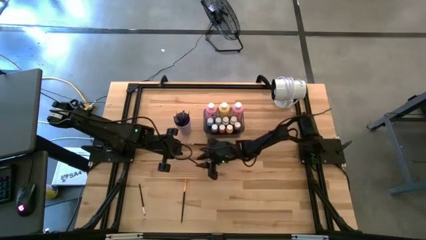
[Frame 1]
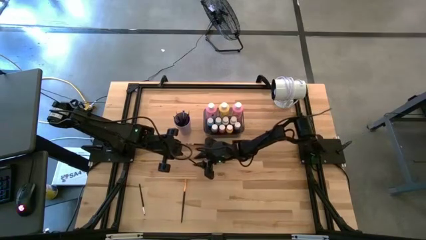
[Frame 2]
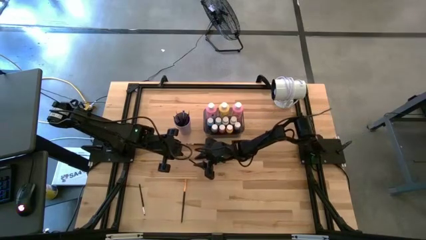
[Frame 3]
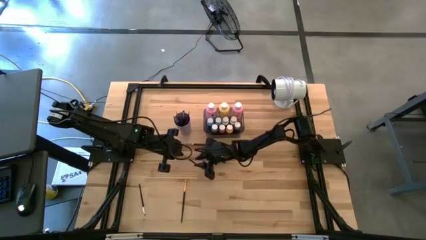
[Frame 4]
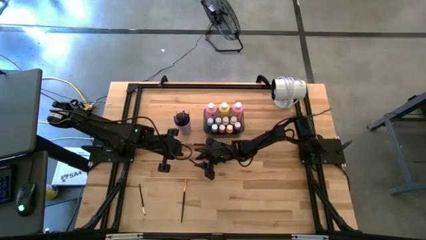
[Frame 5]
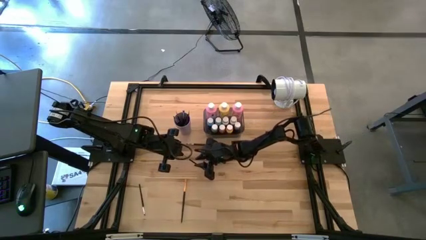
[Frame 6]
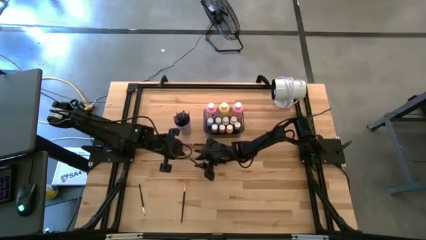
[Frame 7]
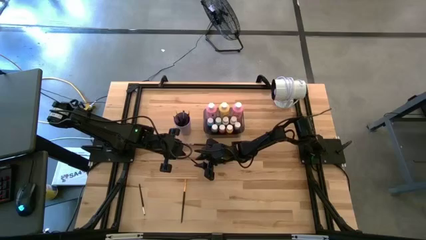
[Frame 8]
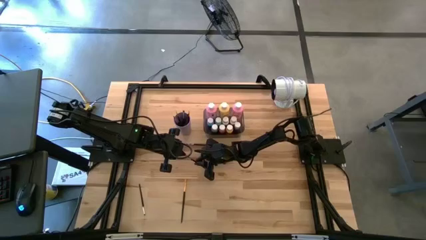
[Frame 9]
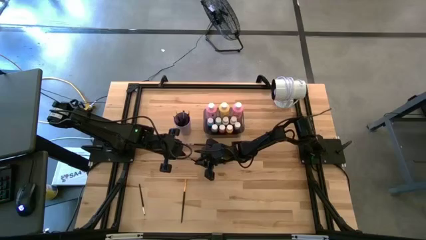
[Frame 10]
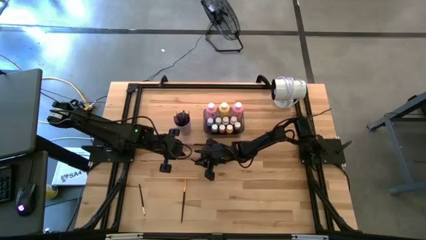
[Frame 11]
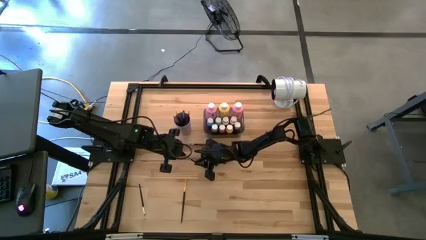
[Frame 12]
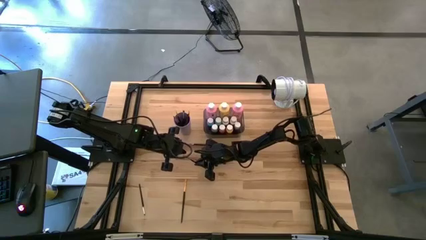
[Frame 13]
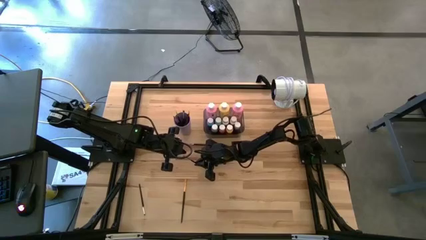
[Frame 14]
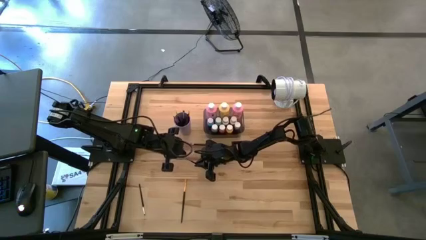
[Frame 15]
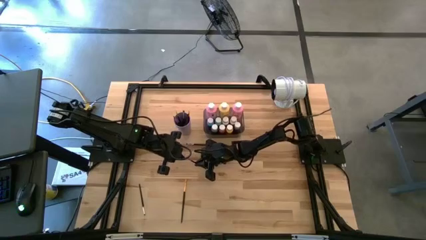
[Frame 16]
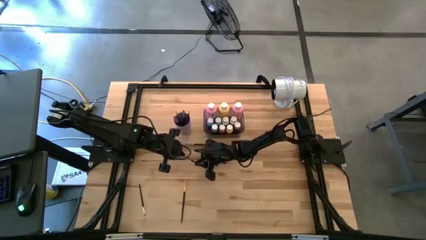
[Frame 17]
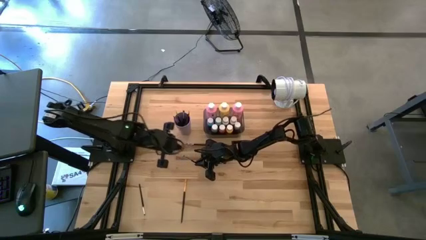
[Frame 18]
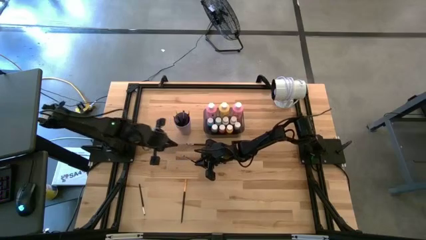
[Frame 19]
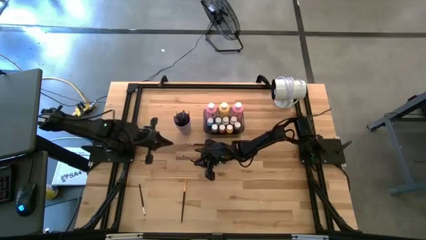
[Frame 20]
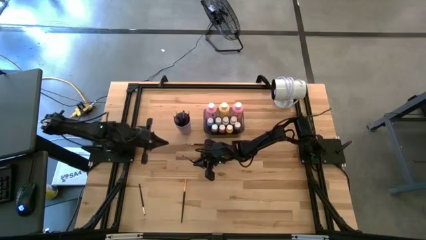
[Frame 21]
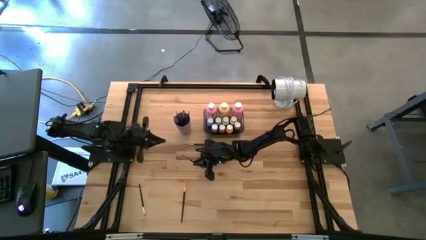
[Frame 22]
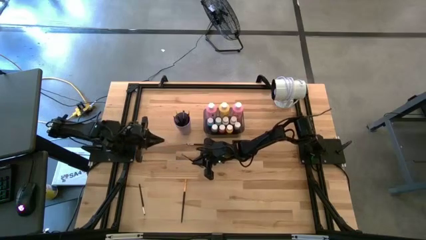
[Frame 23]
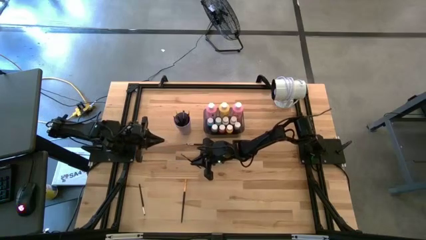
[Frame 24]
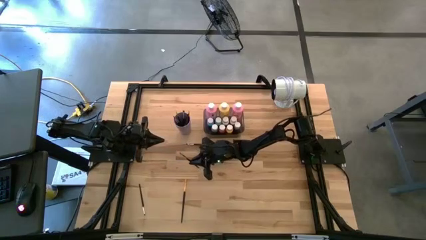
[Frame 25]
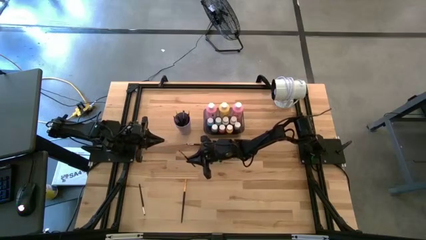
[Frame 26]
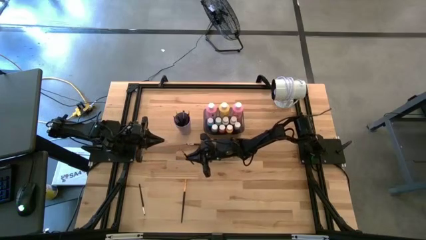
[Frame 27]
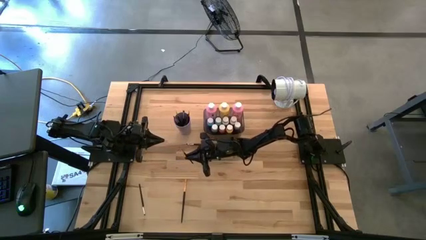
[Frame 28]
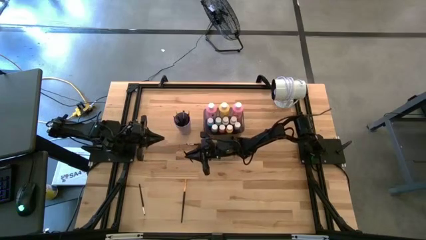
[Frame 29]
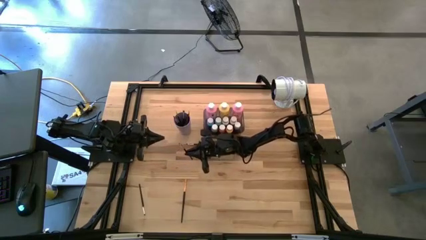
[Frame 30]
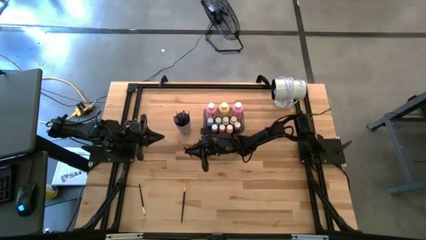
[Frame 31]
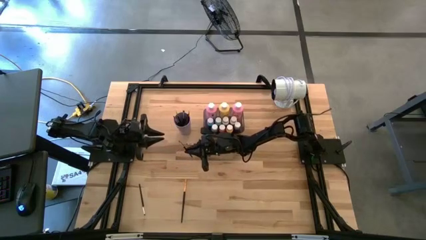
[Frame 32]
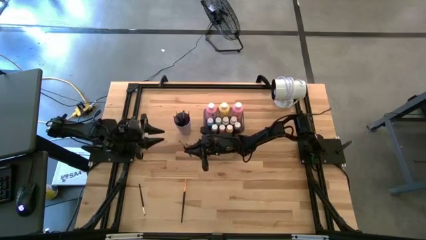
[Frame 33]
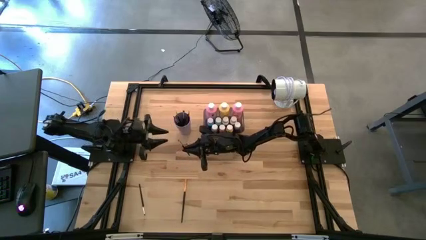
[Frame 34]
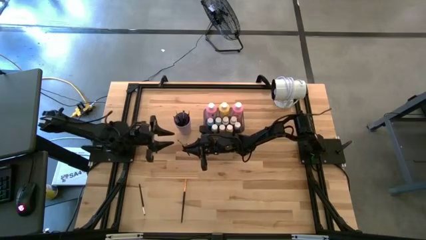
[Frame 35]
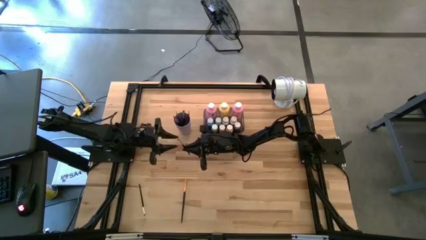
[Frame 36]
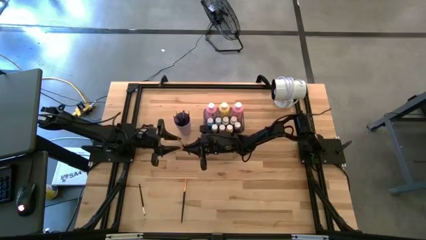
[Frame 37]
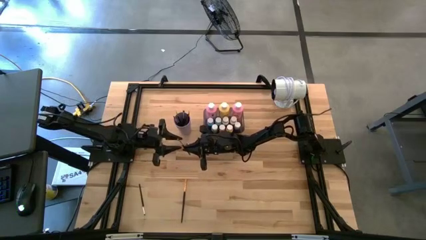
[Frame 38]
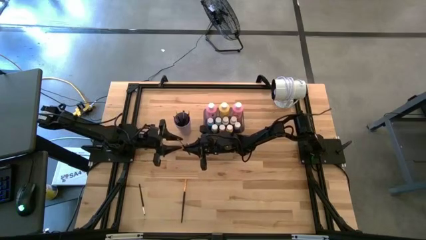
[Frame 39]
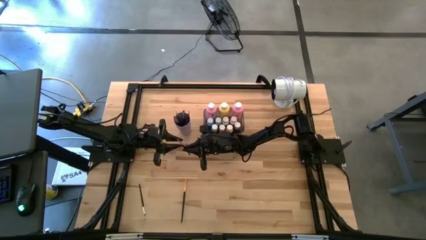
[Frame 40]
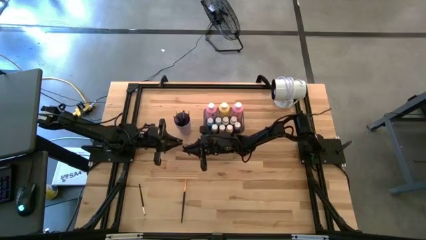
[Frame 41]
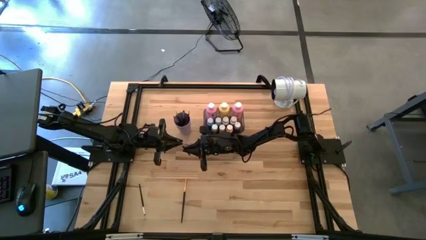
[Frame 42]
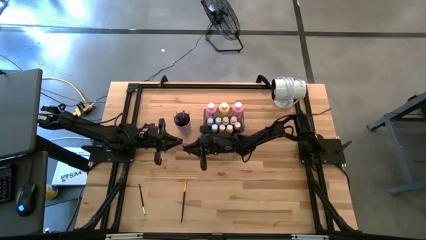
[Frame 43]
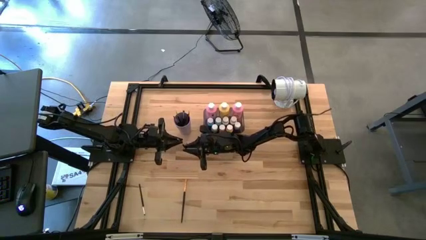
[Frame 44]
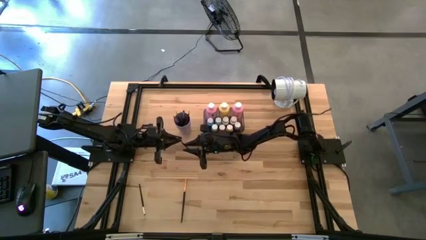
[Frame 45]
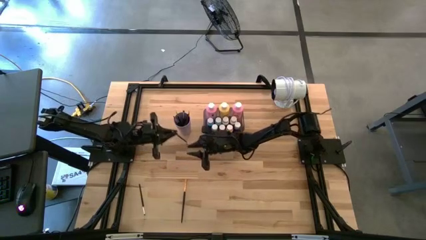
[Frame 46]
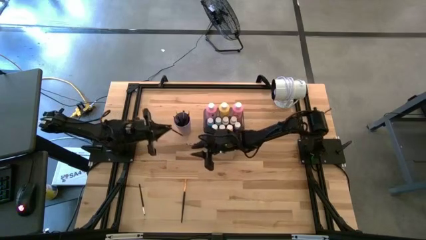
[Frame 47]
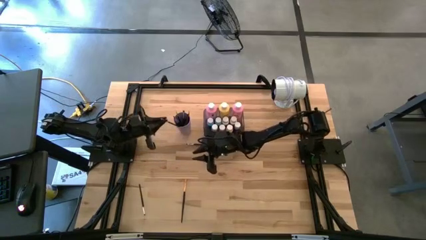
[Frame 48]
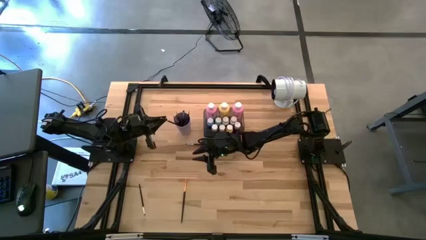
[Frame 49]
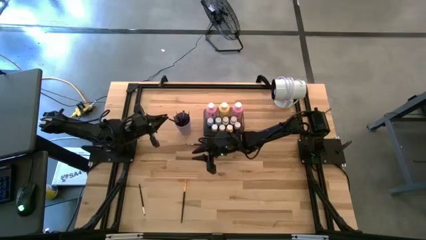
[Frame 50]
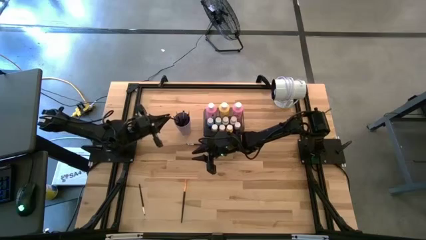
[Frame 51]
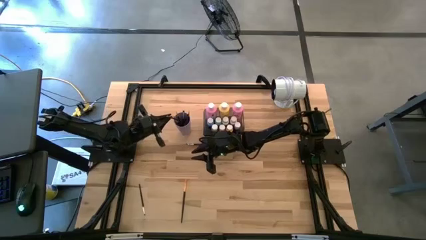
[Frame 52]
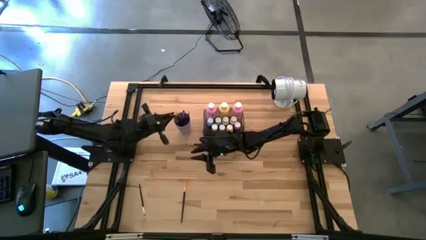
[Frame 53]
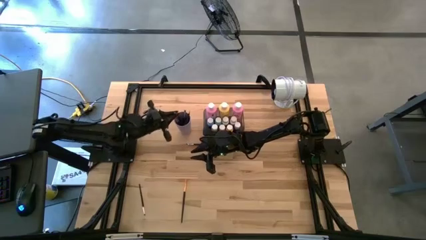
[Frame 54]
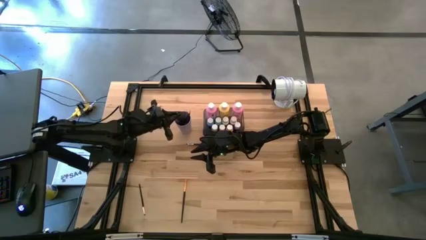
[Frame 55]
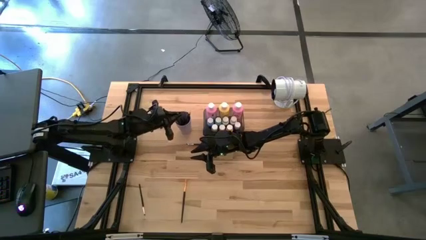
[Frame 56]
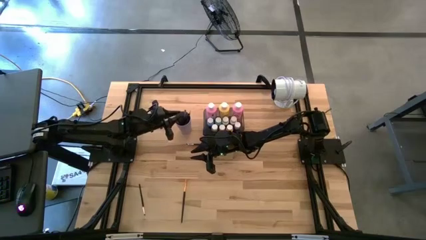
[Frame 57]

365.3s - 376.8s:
Task: Pick & Place Paint Supplies
Put the silver paint brush into the purple cup

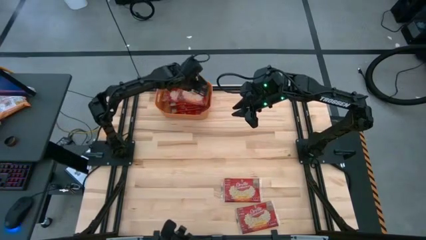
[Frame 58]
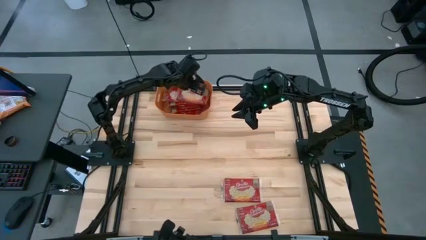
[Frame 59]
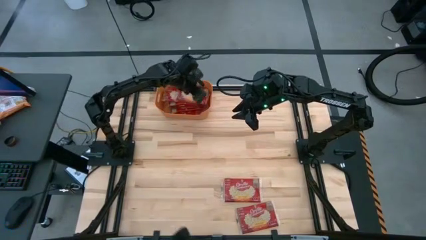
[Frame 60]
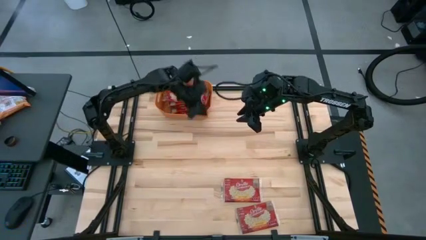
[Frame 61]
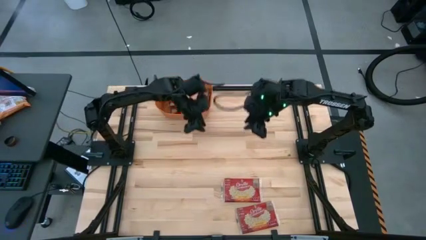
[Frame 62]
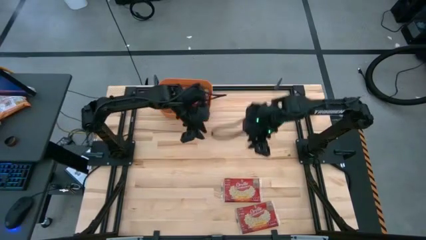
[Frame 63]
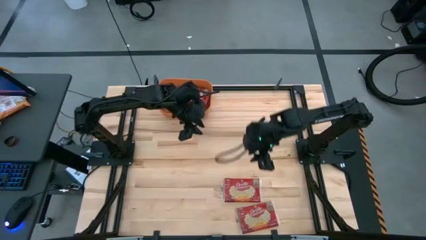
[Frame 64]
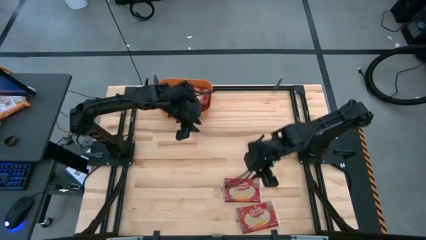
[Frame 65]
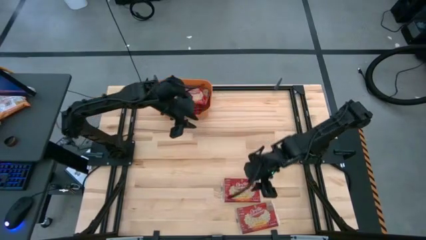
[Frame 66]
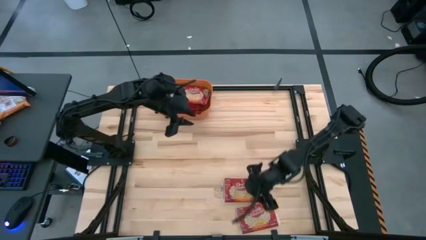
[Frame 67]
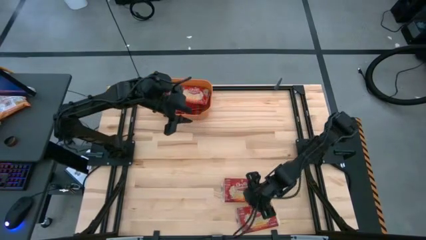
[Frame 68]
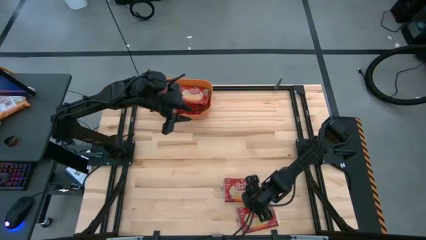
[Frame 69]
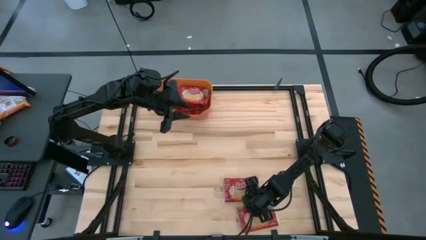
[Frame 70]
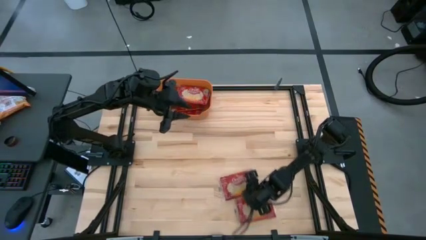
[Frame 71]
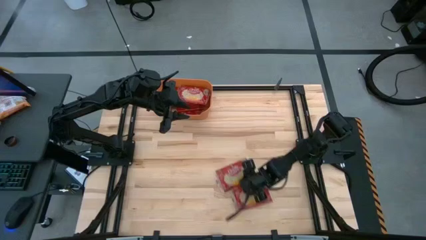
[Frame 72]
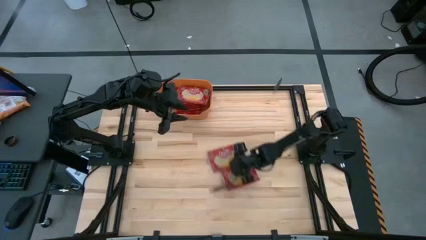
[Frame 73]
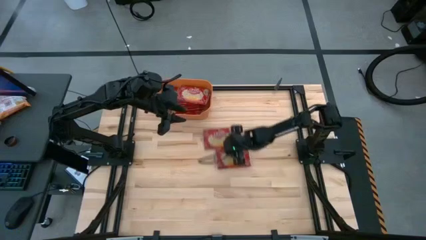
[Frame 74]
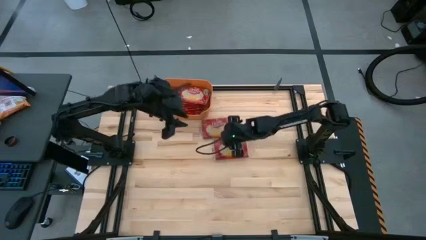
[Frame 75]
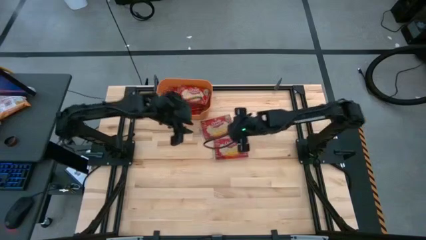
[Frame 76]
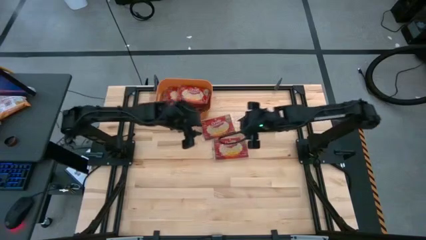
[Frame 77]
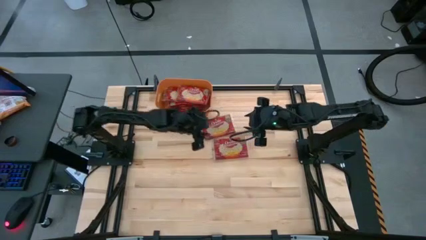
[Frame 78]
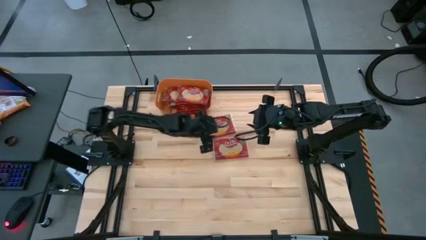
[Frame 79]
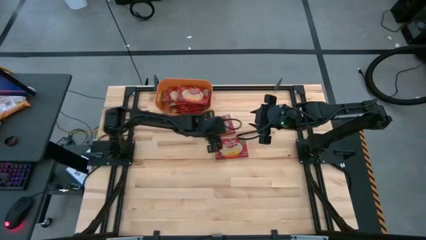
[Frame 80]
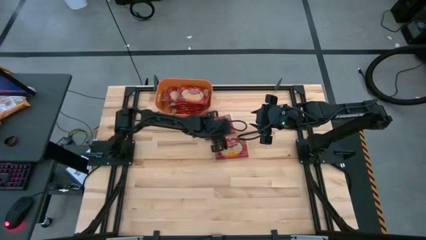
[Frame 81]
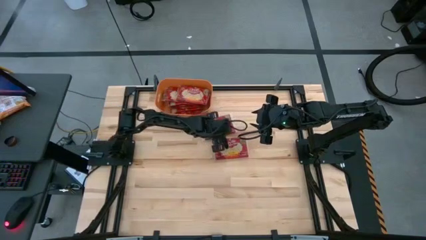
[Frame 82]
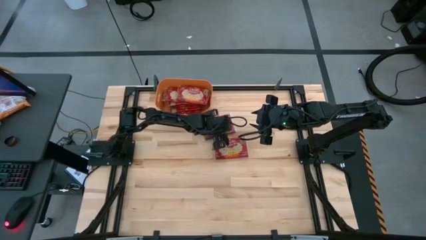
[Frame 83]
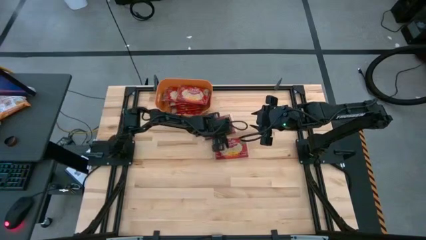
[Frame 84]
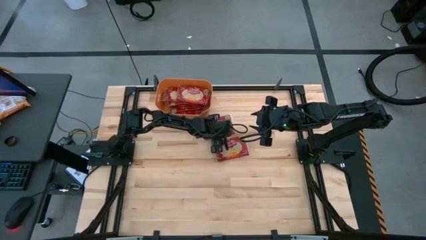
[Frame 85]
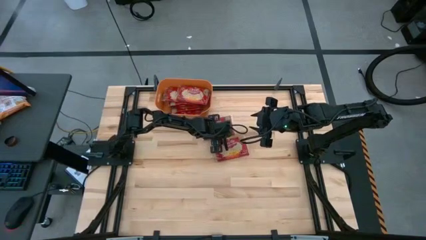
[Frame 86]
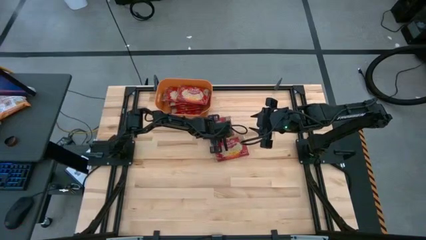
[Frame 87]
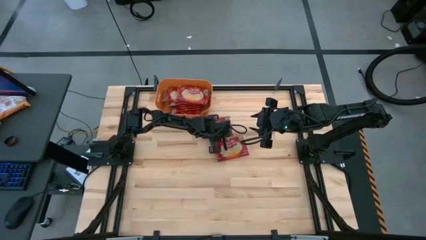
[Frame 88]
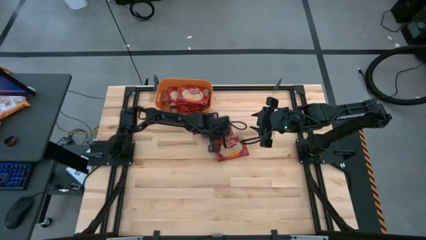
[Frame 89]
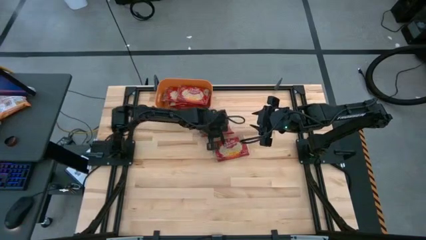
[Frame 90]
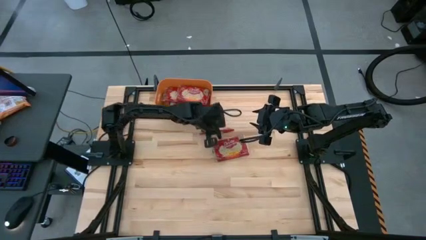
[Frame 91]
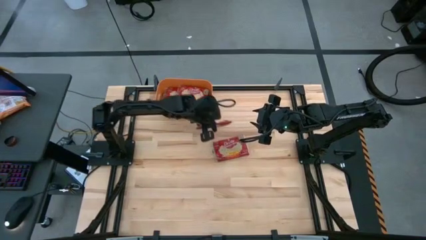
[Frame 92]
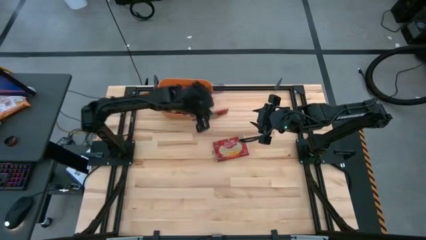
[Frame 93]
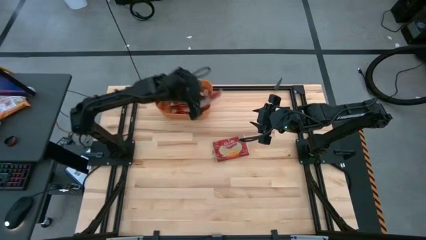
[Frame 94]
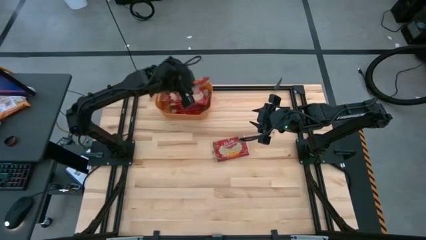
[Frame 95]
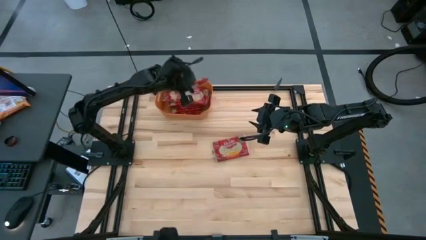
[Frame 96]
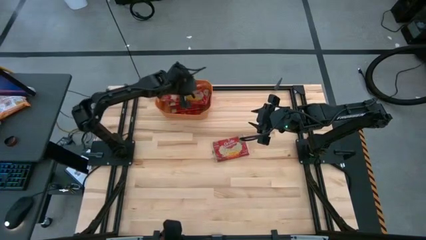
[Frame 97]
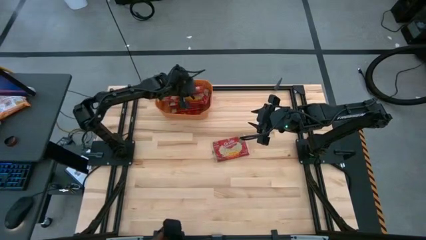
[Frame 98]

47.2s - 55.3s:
Task: Sort popcorn bags into baskets
Put the red popcorn bag into the orange bin
